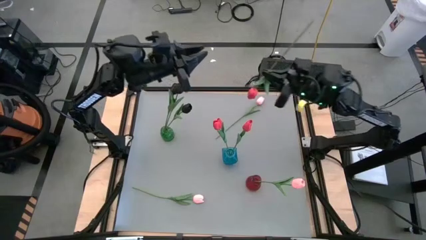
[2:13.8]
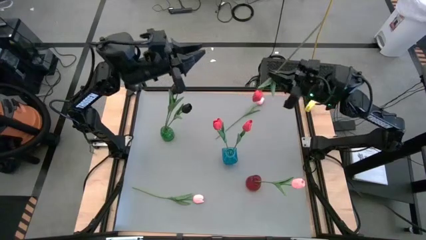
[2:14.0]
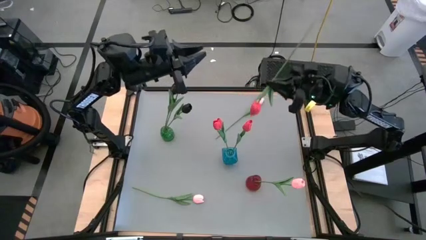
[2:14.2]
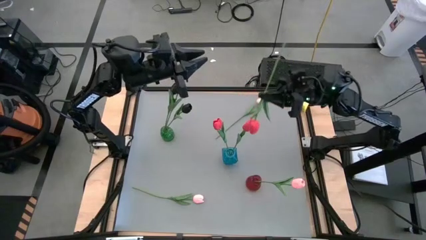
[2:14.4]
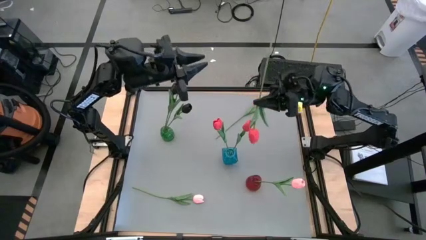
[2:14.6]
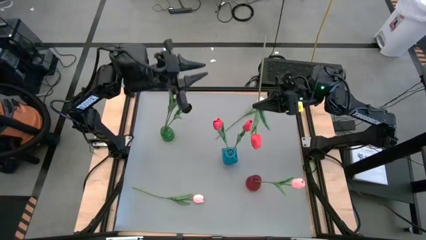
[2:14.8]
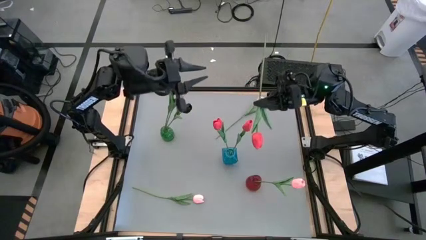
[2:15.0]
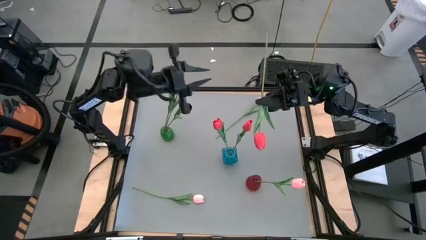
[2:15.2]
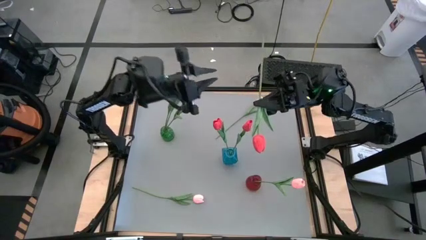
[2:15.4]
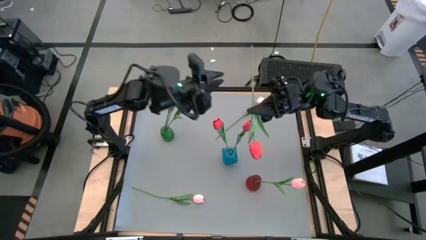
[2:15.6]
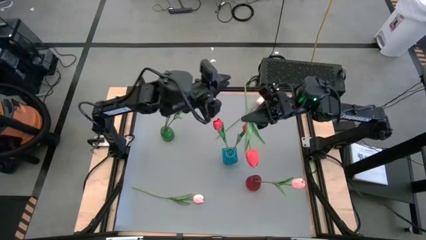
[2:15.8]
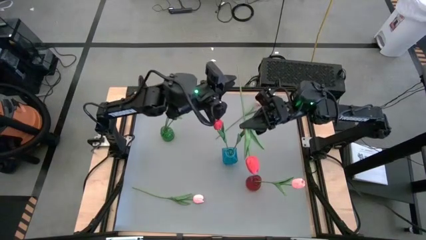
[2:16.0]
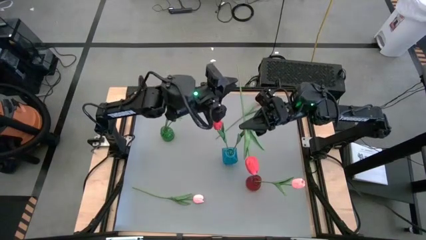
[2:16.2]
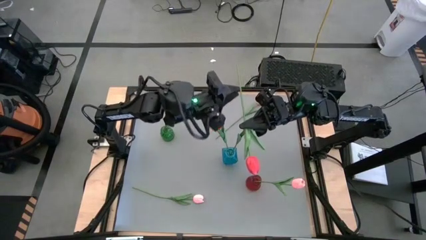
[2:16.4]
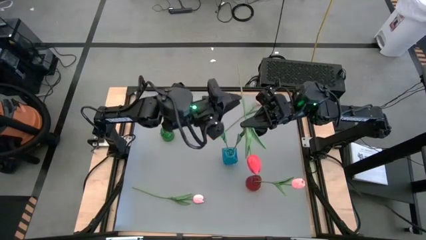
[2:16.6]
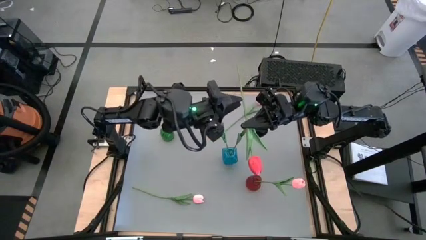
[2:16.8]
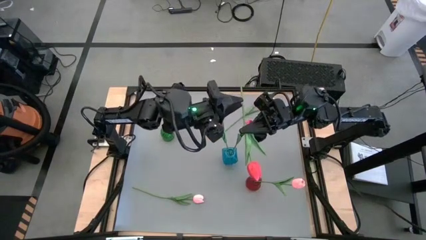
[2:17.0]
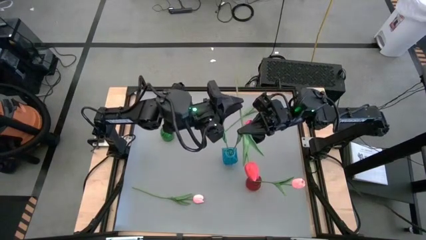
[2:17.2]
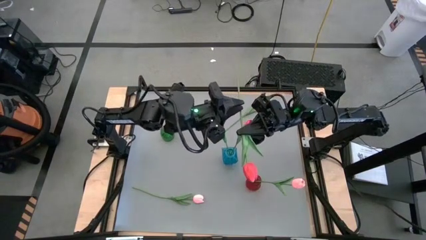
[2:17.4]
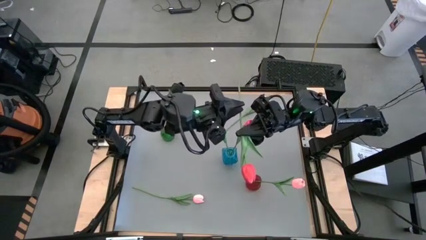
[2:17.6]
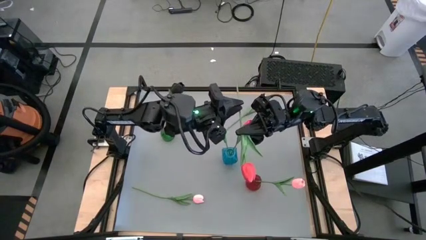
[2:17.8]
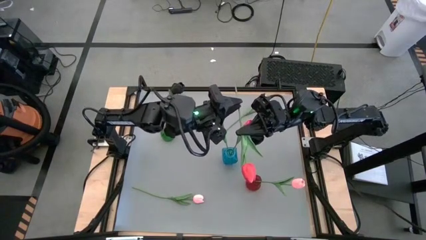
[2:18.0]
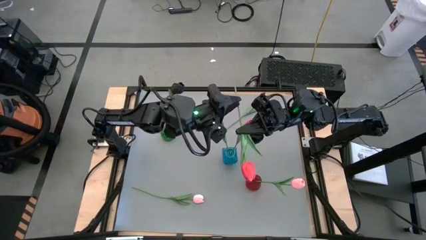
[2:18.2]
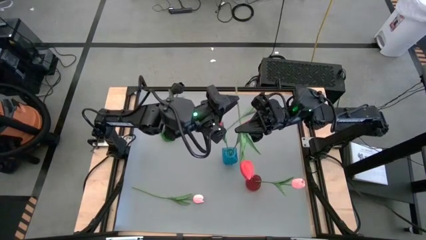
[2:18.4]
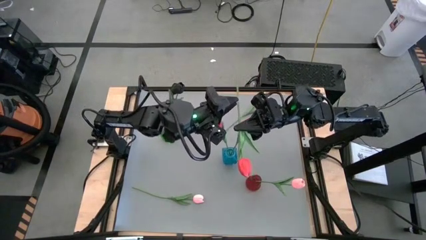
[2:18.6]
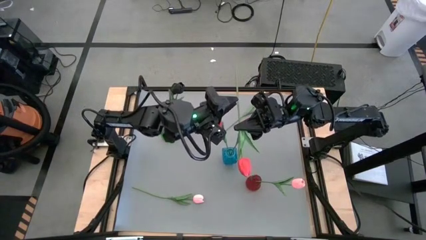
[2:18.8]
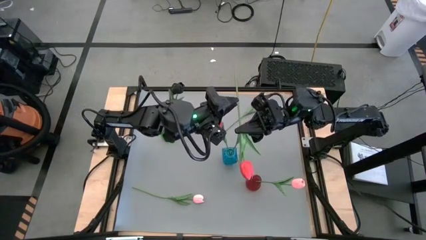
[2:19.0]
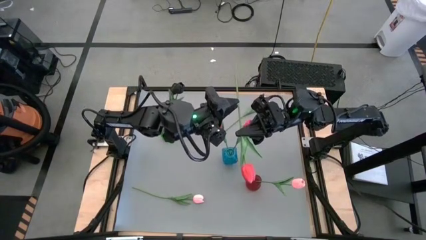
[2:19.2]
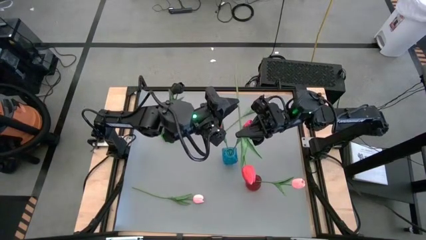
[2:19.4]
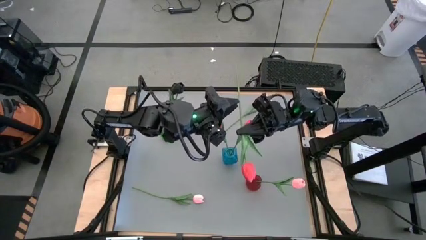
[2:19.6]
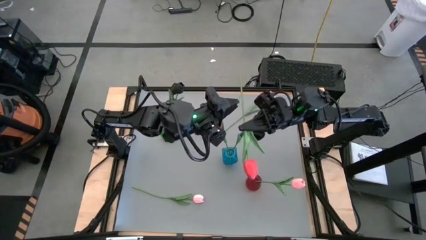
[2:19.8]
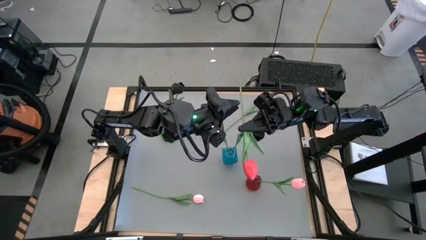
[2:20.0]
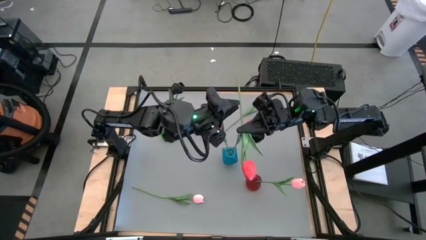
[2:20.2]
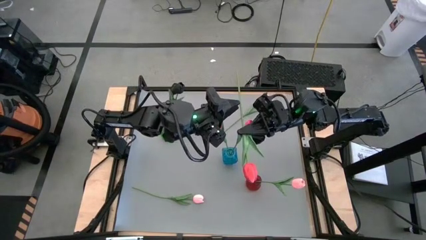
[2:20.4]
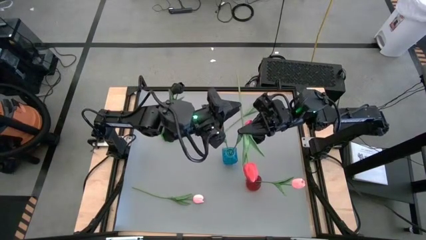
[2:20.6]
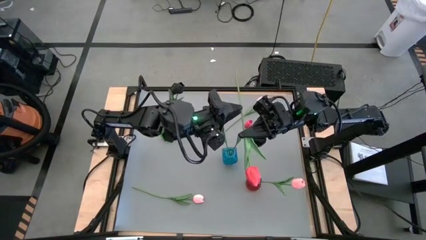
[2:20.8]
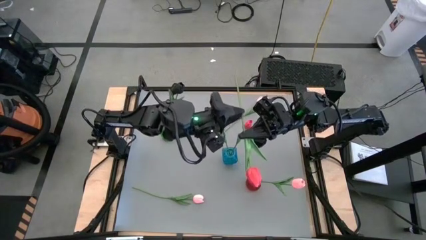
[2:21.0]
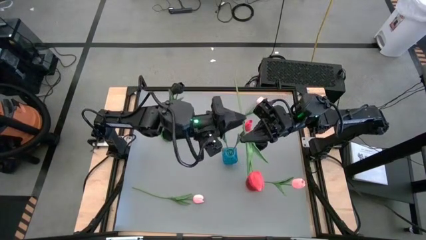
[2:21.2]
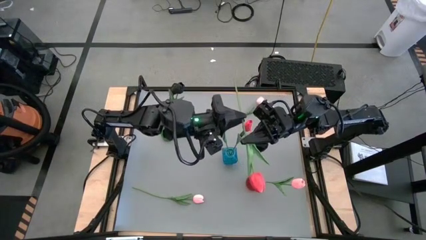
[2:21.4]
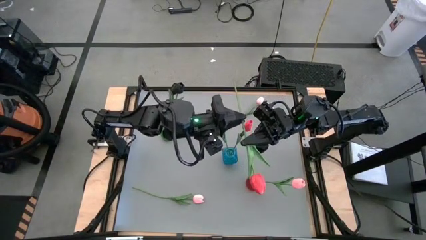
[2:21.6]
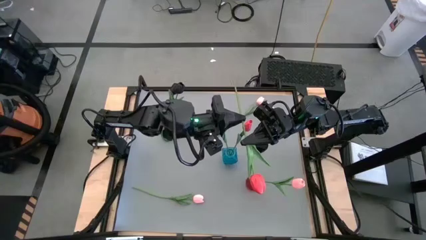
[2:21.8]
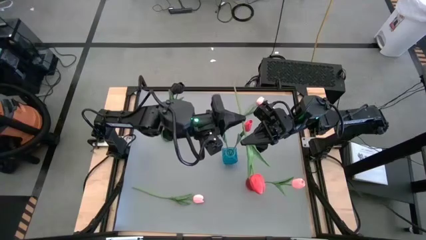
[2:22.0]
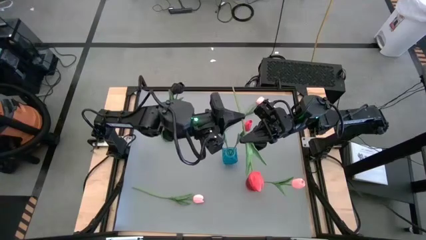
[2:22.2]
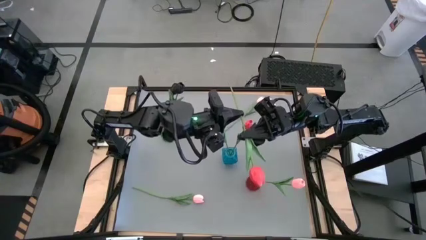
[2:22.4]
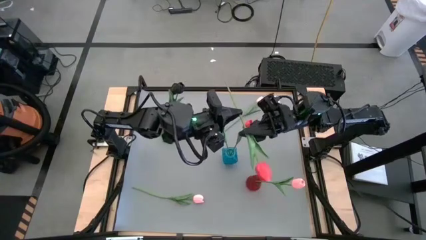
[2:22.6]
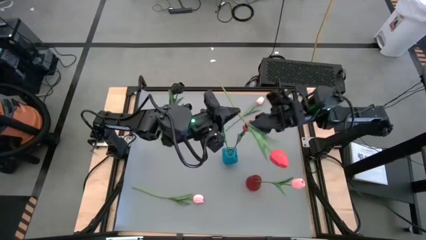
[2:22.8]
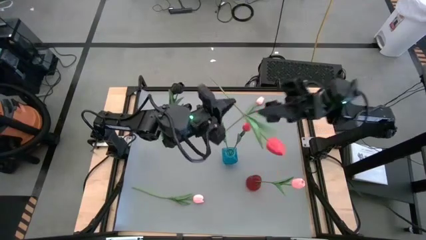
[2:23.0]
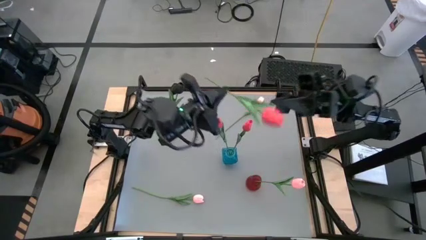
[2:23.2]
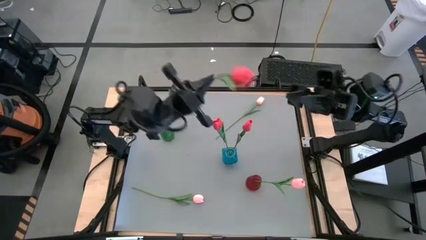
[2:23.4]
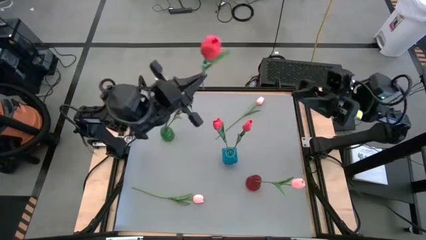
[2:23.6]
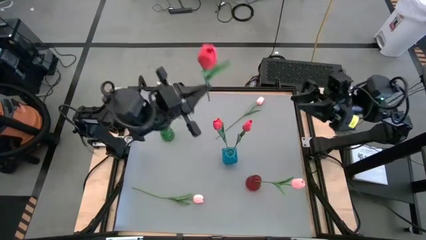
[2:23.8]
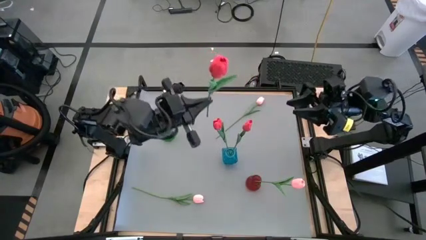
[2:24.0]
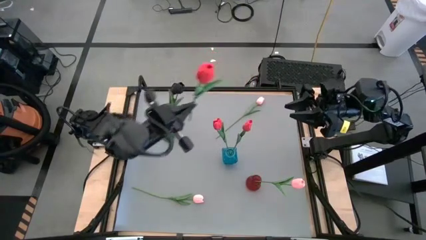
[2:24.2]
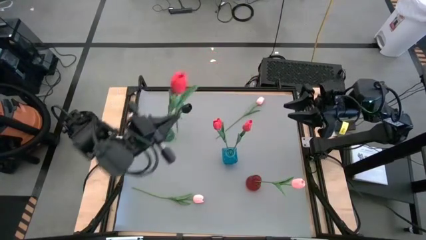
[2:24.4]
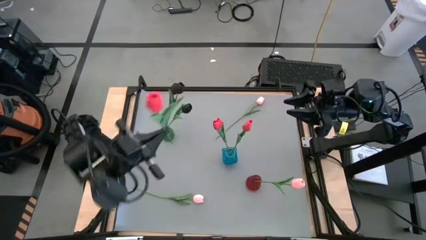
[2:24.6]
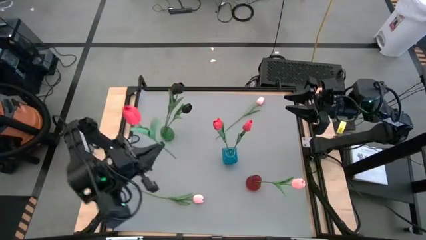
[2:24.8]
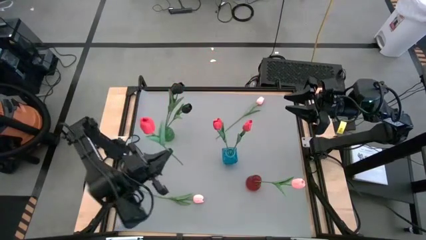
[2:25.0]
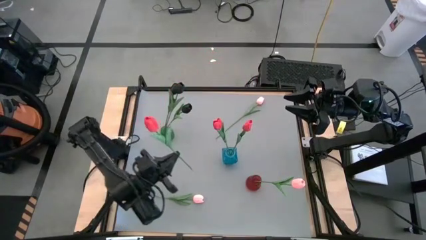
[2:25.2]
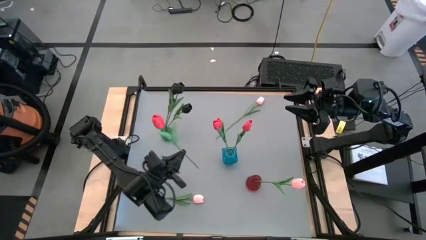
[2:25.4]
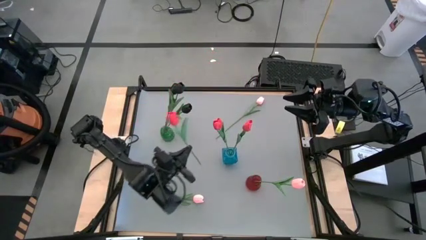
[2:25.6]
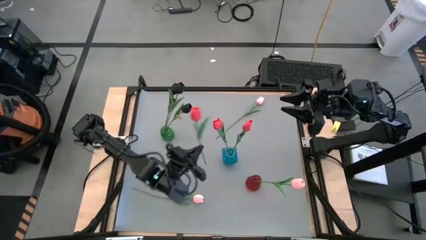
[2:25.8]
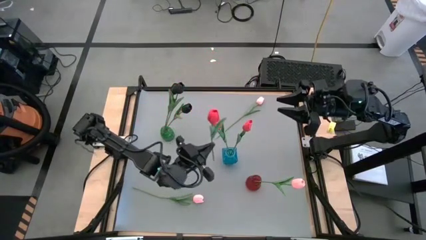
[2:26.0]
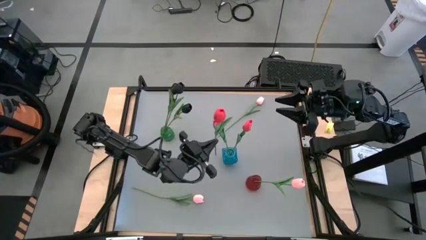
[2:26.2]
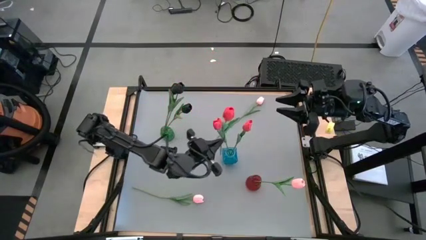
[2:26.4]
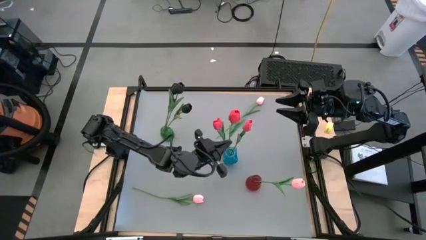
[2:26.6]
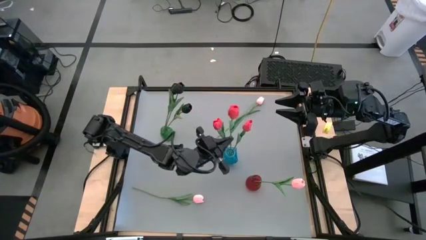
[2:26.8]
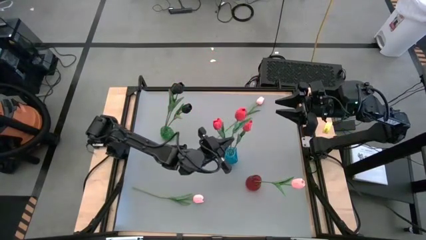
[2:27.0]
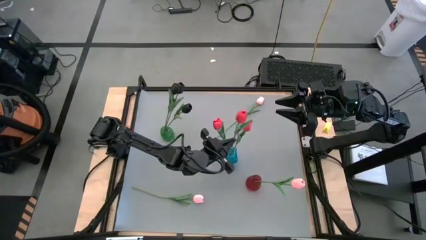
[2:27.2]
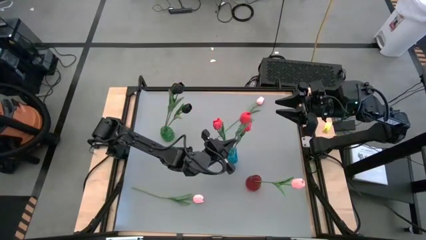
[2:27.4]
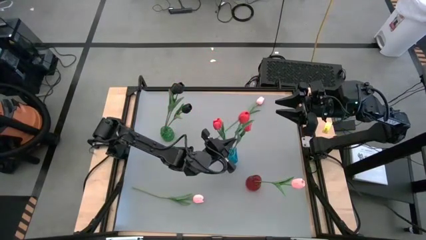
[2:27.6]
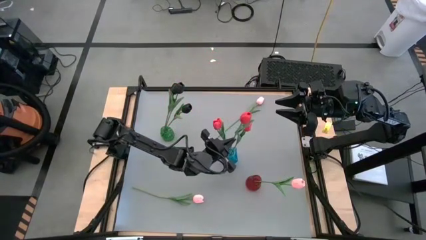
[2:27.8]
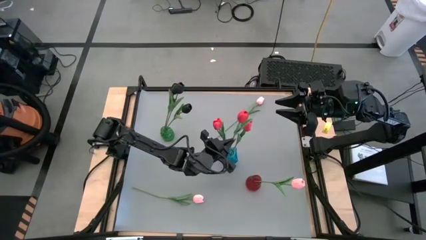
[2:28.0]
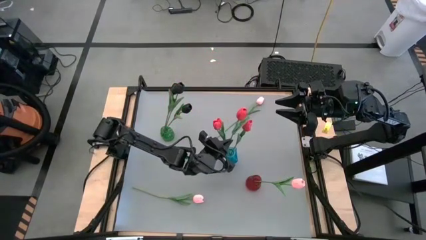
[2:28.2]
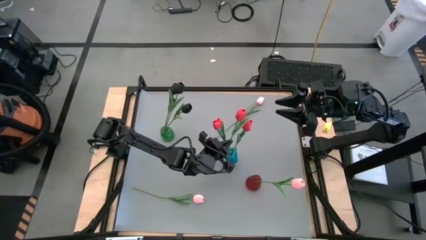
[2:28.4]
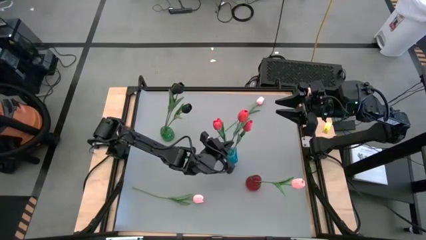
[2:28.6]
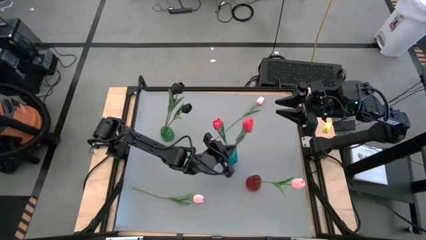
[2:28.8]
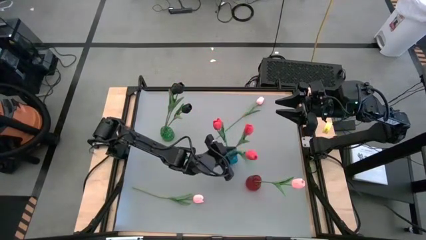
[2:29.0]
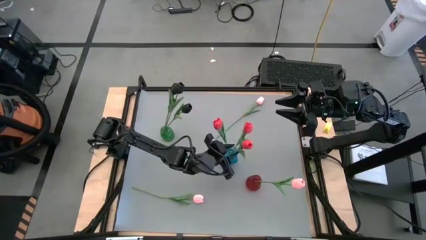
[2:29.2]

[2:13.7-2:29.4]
Task: Sort flowers into vase by color
Put the red tulip into the blue vase
